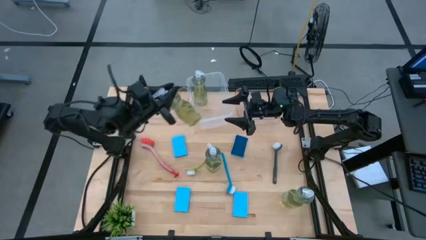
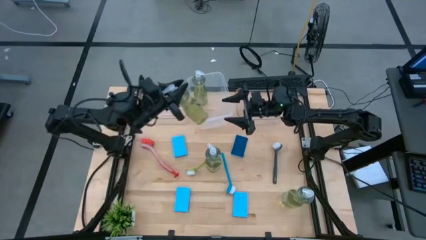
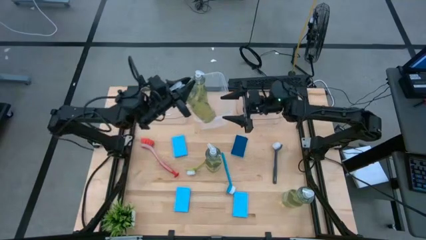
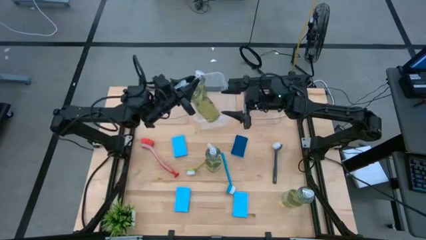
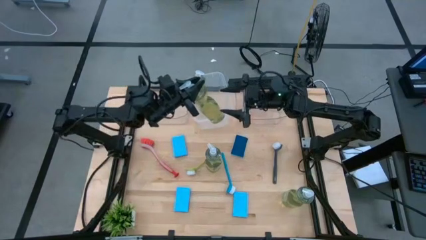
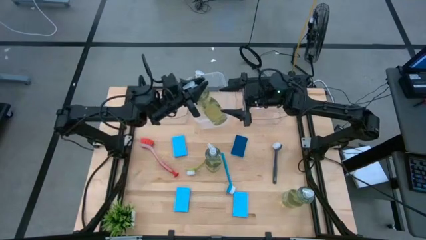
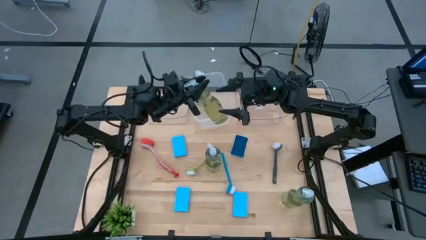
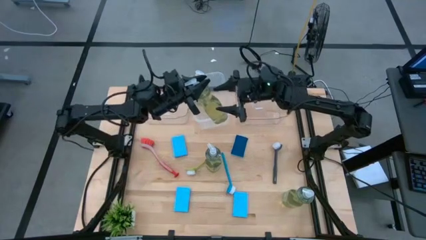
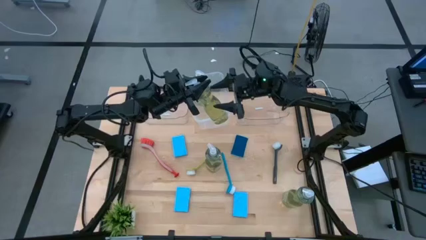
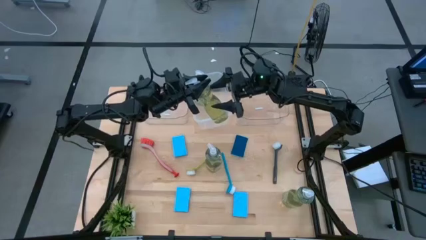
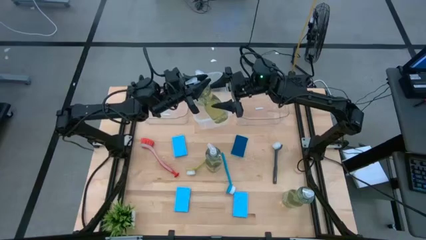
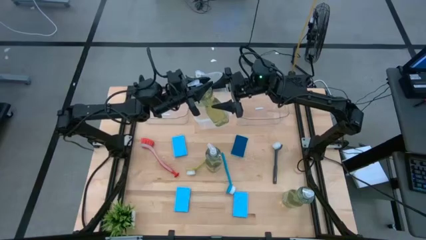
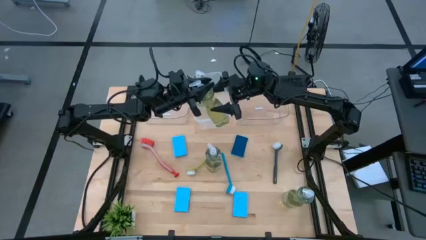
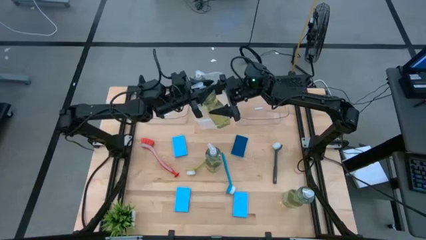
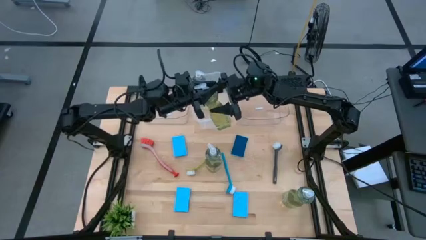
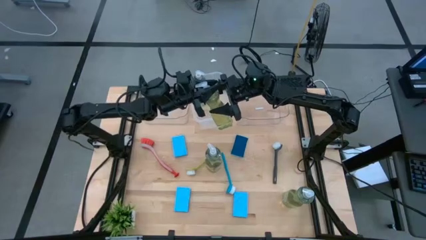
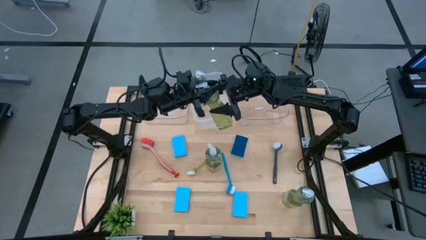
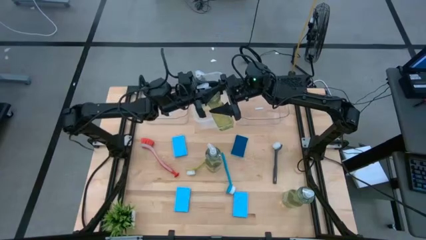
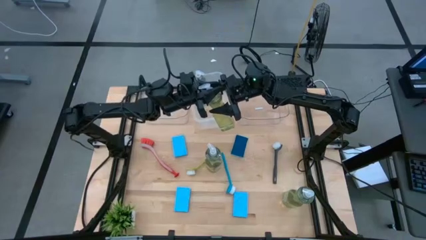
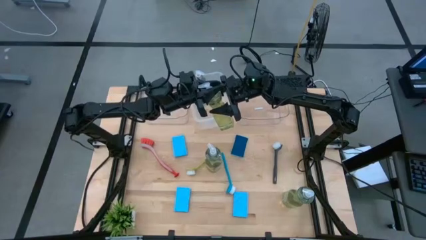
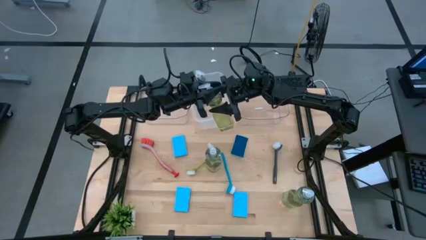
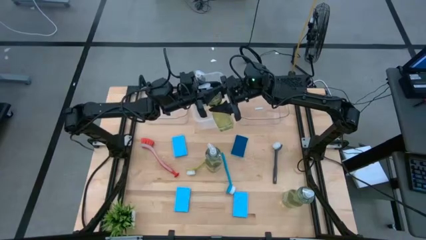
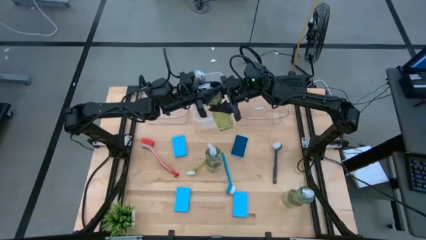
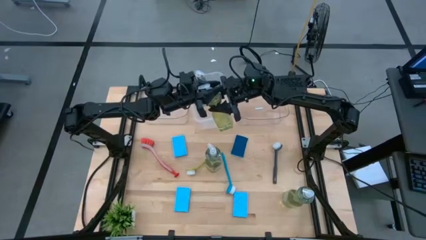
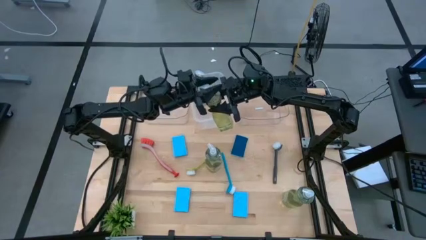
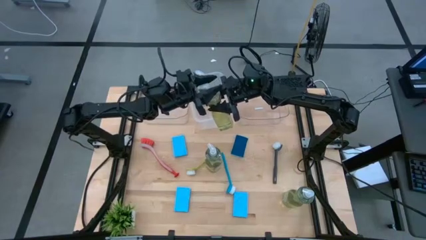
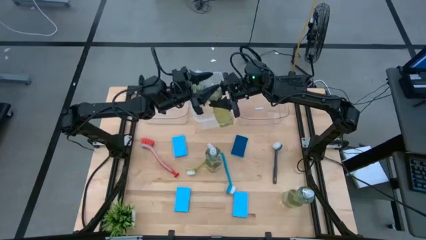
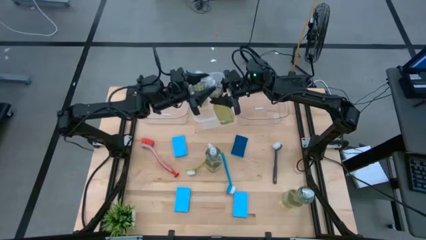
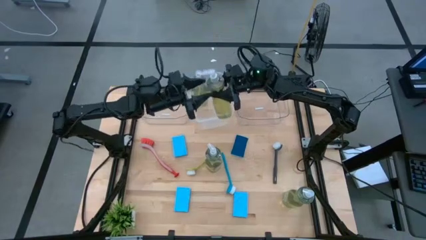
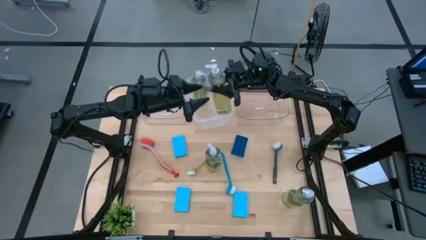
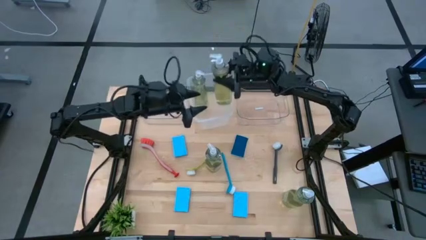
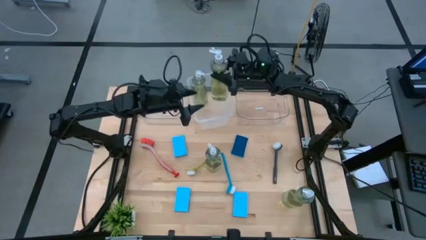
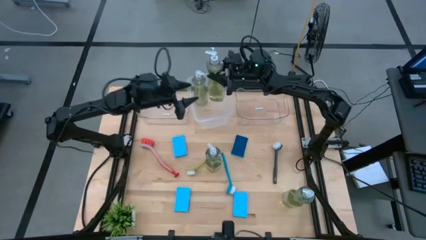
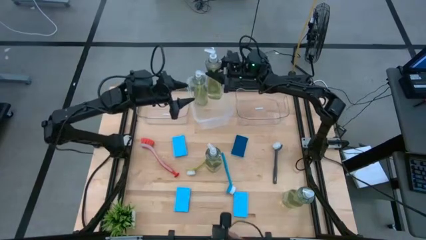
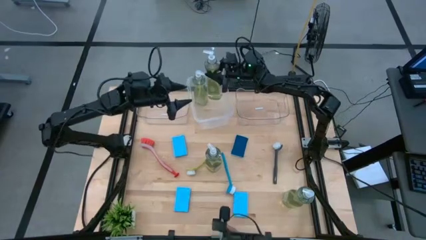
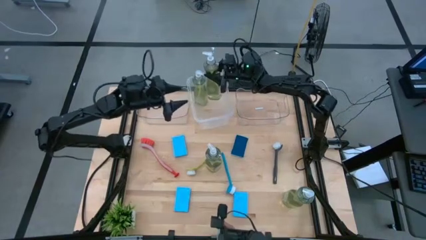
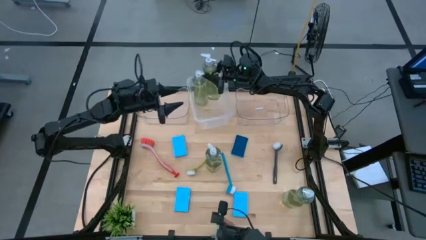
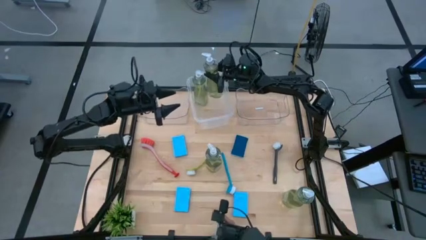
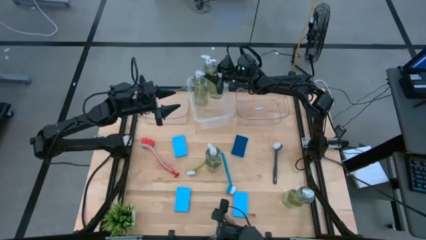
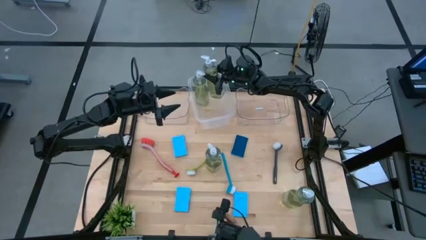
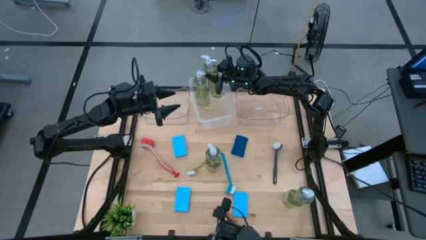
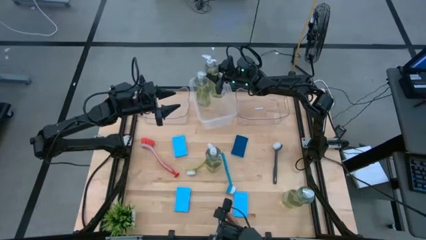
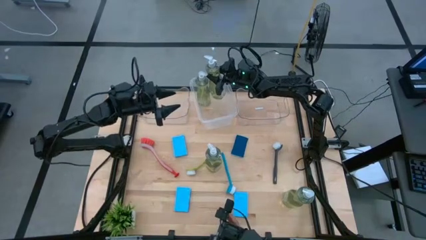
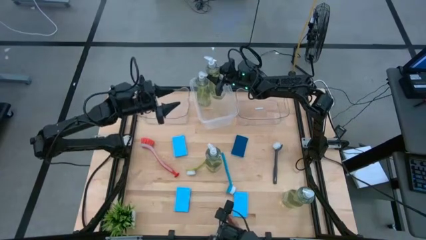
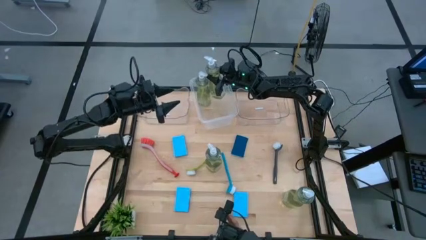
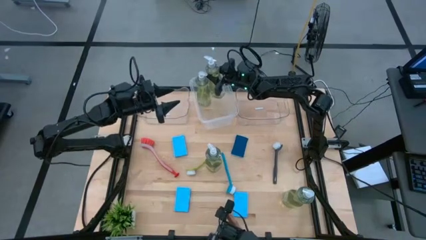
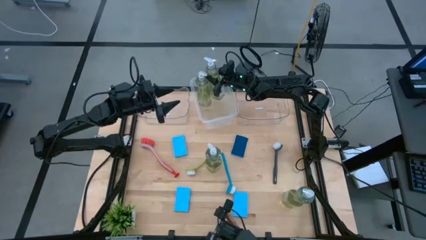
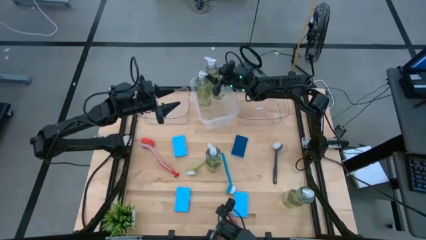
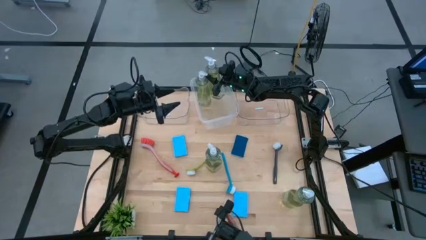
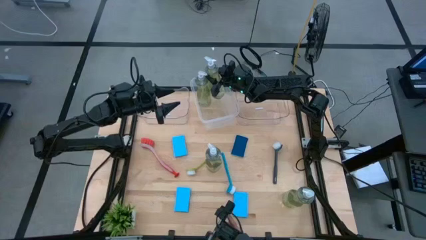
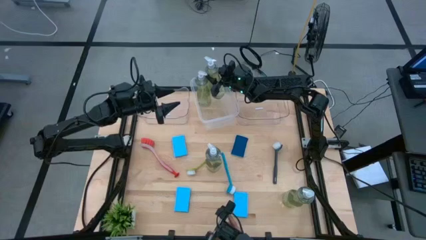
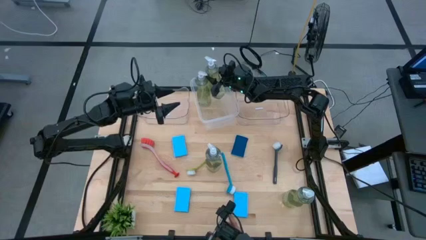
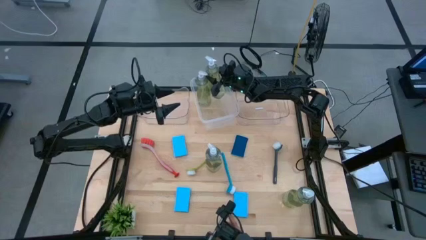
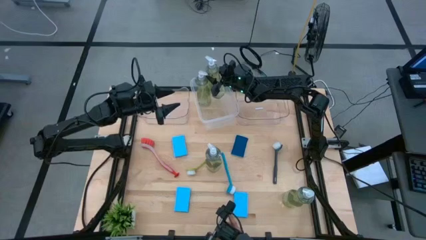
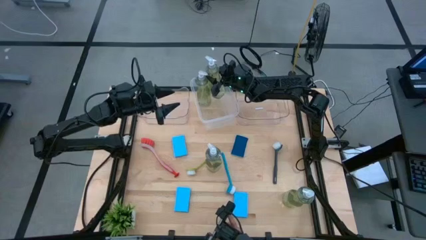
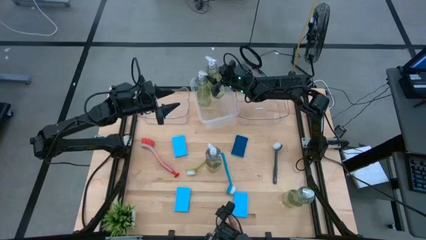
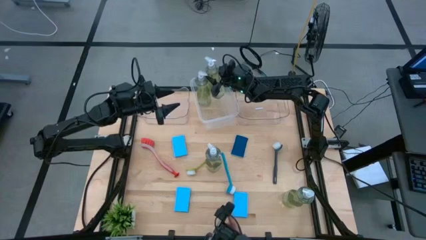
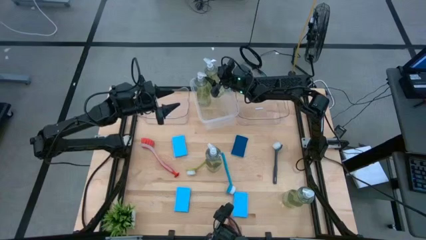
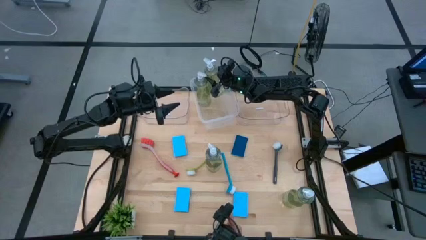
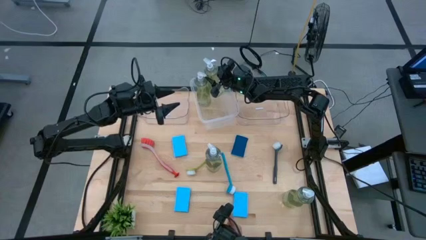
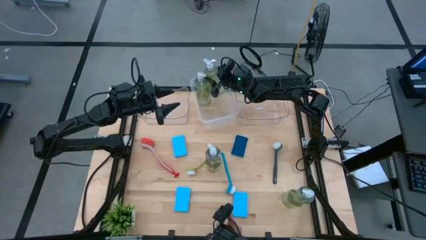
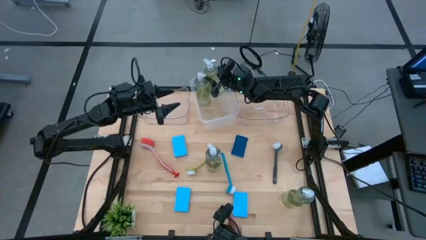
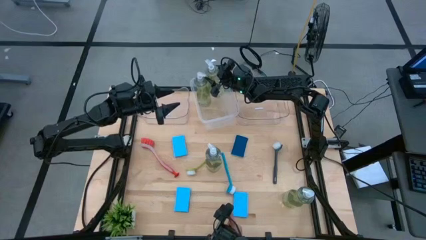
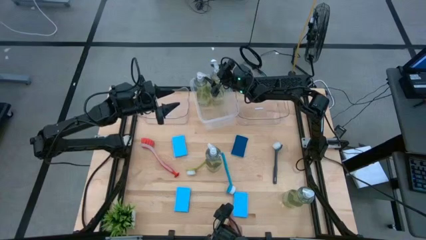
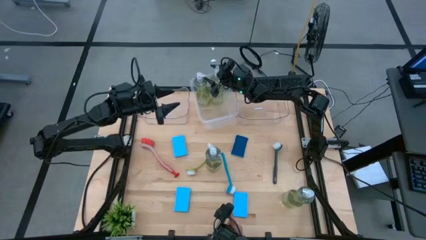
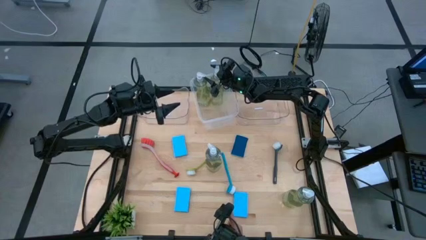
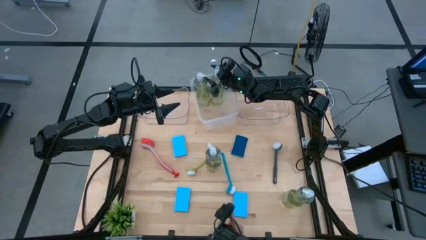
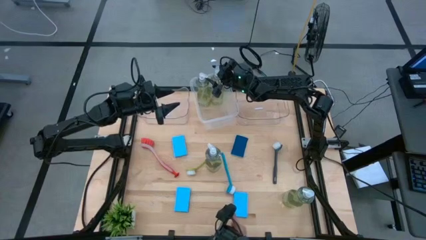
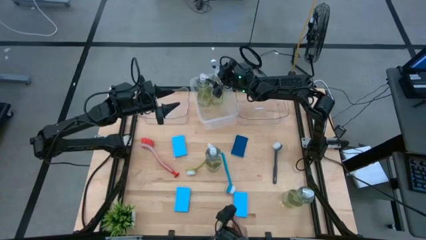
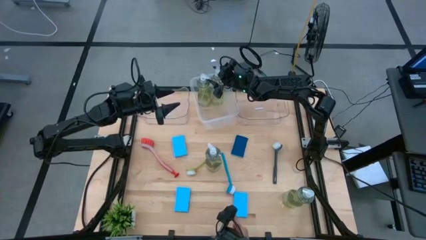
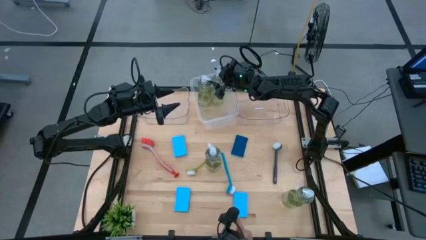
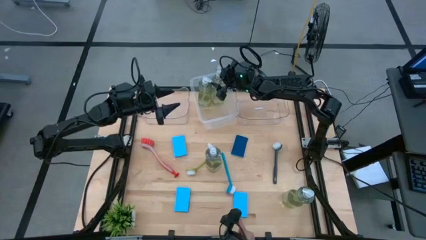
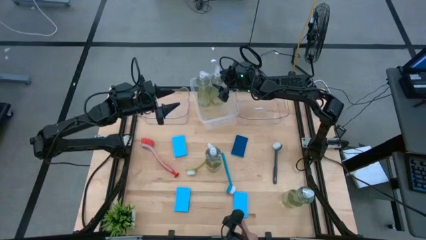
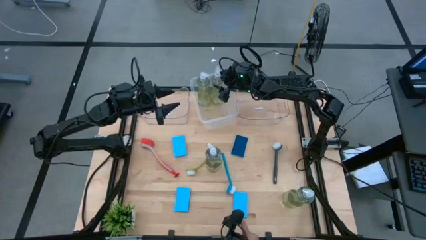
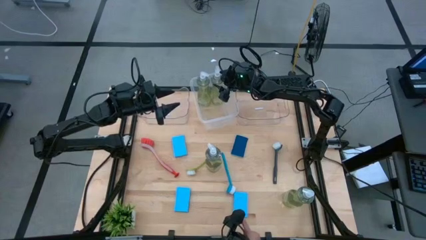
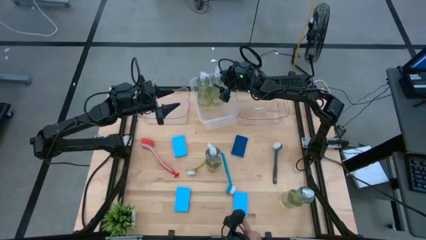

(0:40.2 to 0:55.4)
Task: Pick & Place Kitchen Sink Supplies
Put the green soap dispenser into the transparent white bin

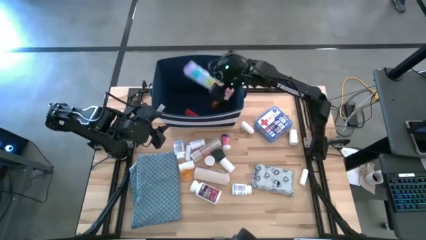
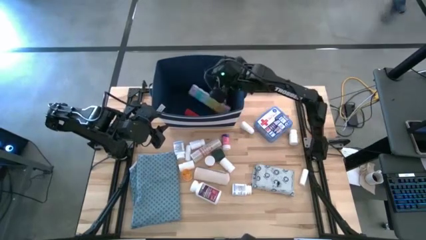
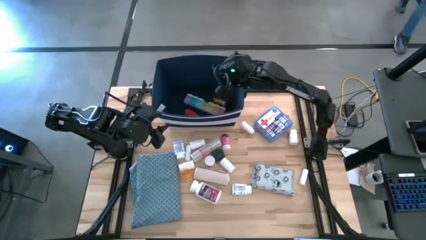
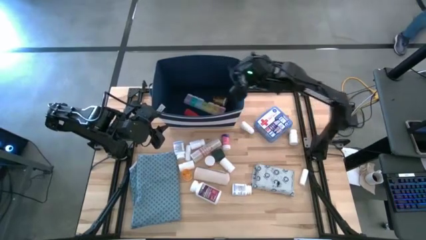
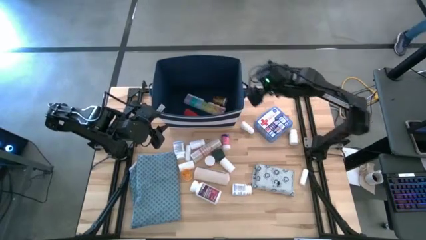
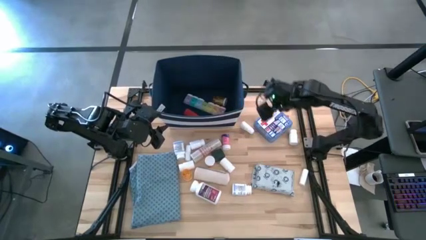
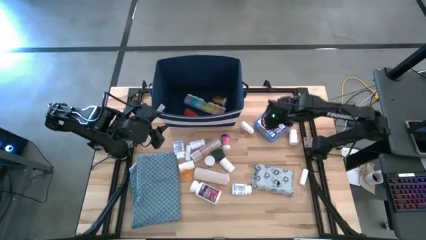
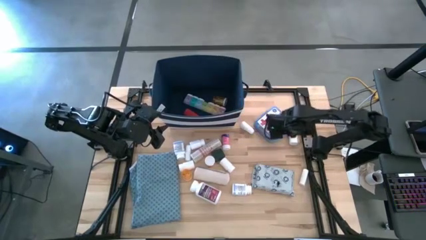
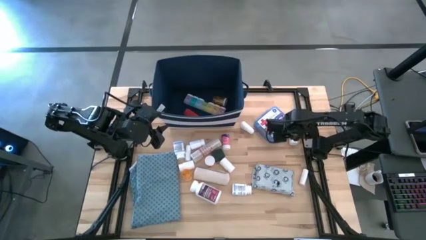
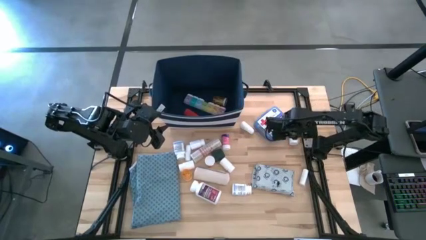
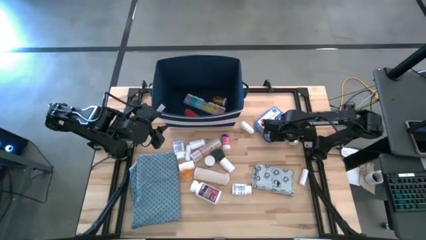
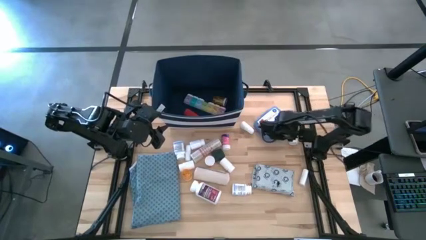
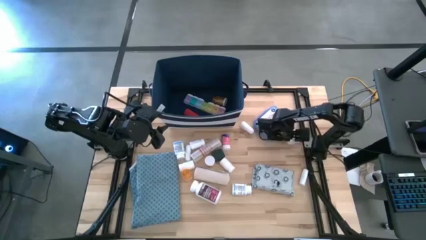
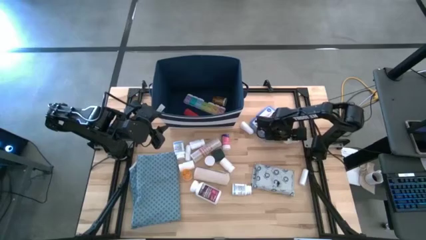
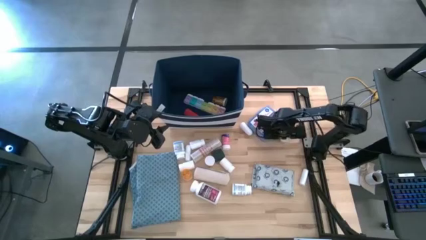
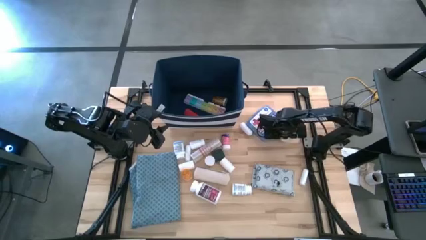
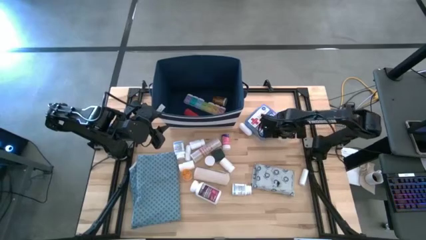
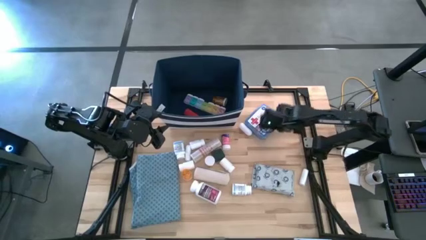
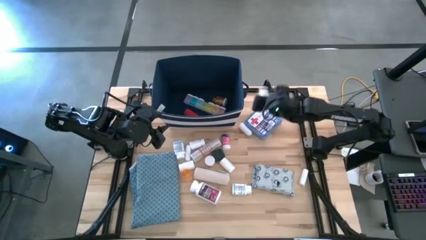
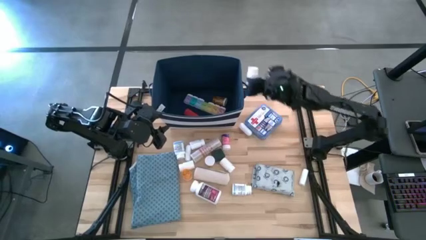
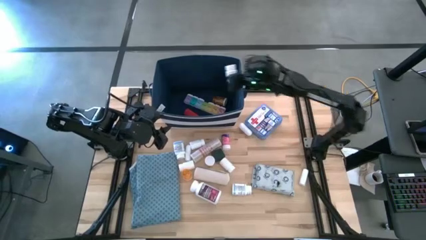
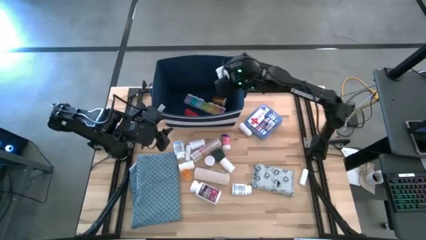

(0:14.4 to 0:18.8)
Task: Pick & place medical supplies in basket/bin
Put the small white pill bottle into the blue bin
